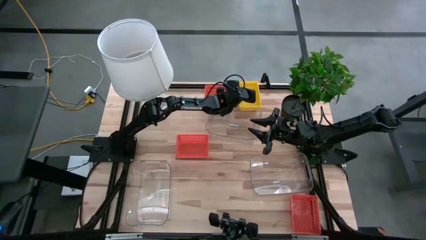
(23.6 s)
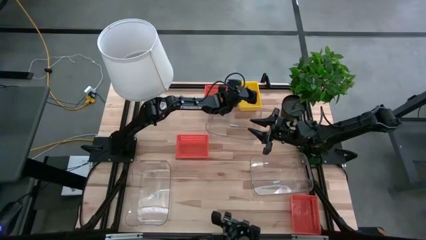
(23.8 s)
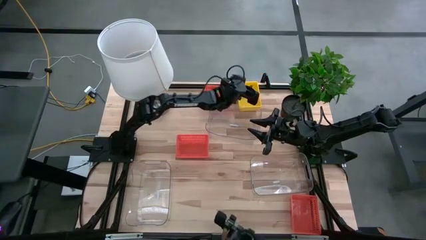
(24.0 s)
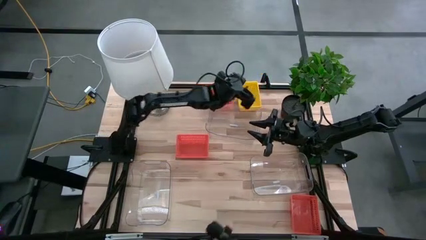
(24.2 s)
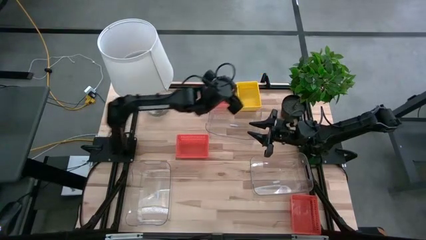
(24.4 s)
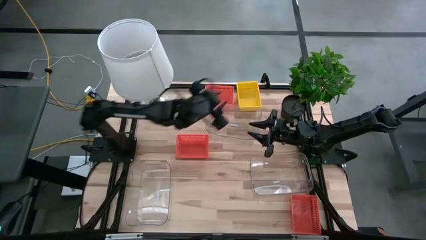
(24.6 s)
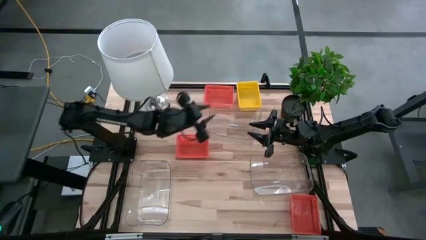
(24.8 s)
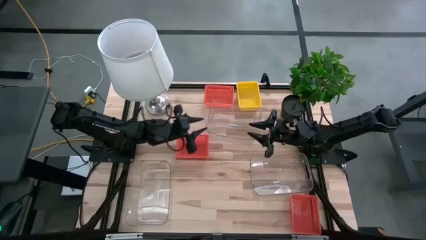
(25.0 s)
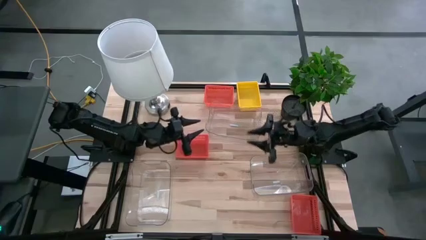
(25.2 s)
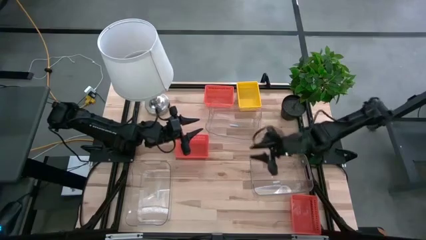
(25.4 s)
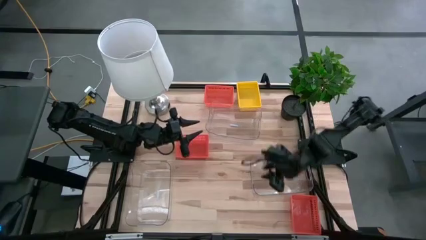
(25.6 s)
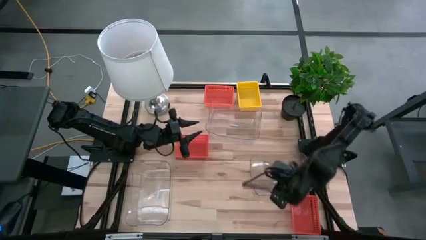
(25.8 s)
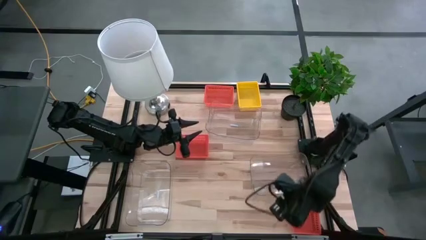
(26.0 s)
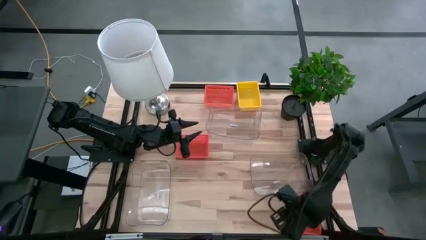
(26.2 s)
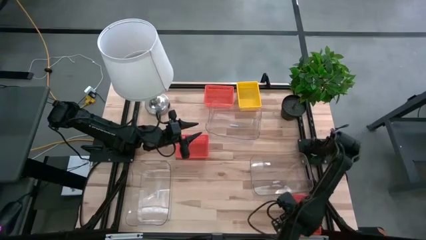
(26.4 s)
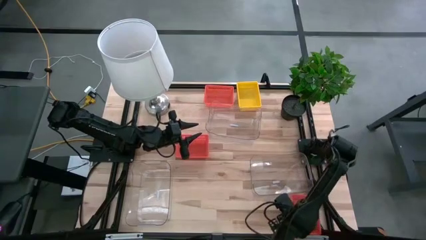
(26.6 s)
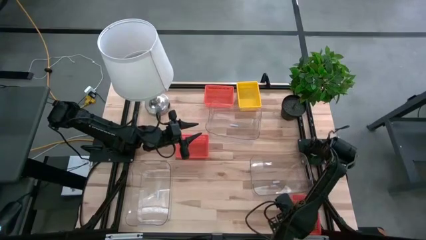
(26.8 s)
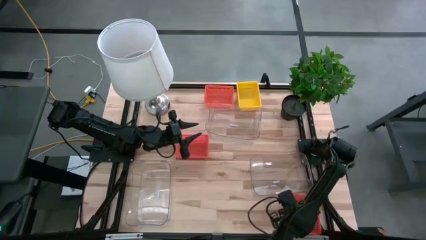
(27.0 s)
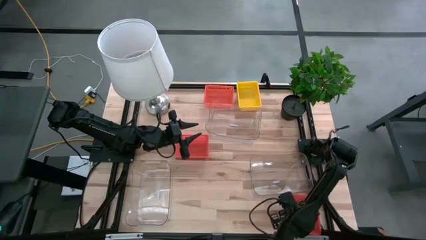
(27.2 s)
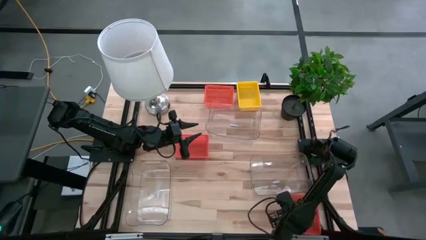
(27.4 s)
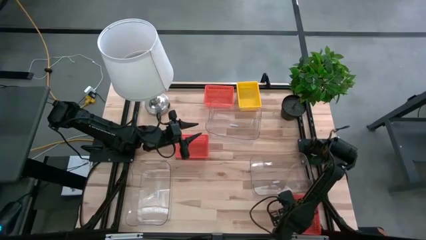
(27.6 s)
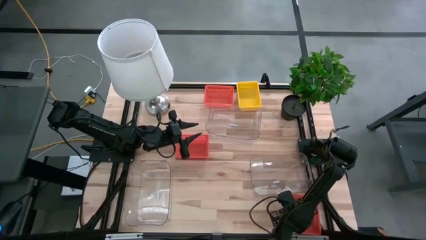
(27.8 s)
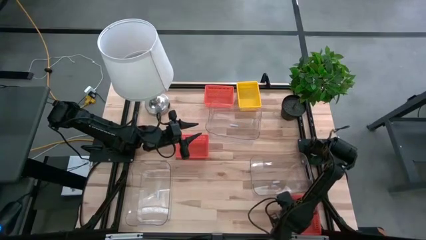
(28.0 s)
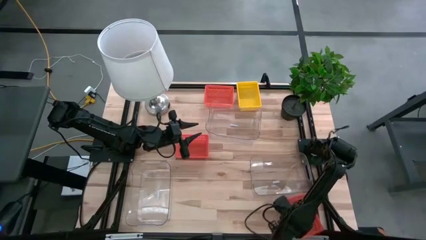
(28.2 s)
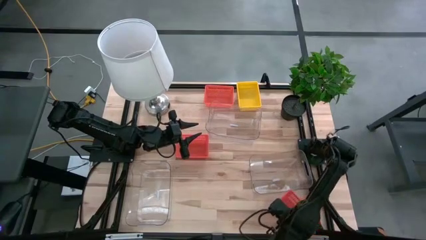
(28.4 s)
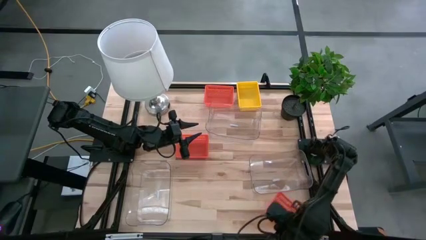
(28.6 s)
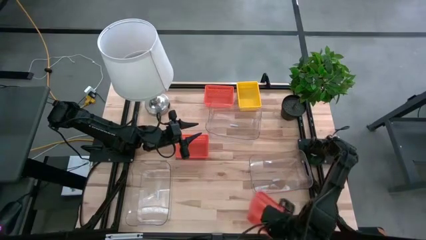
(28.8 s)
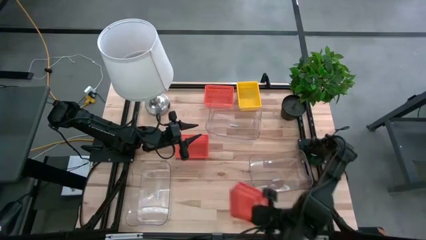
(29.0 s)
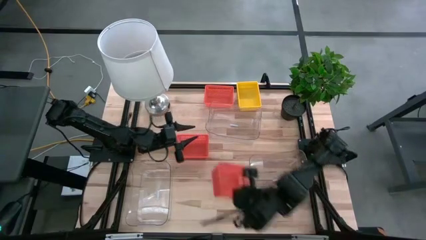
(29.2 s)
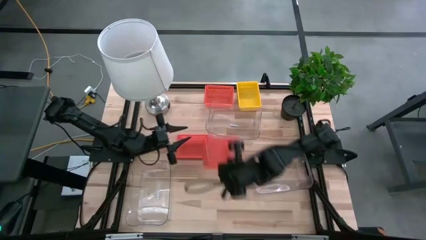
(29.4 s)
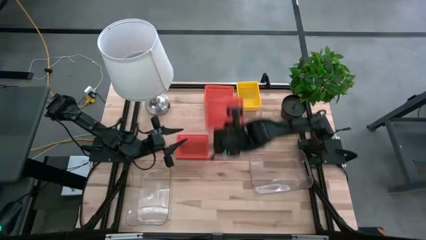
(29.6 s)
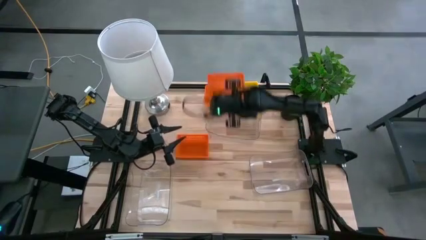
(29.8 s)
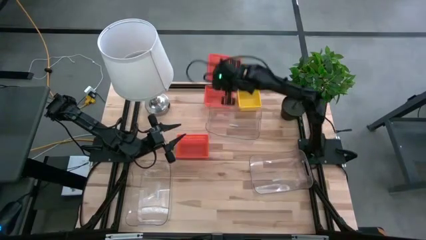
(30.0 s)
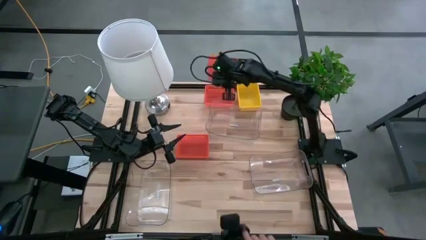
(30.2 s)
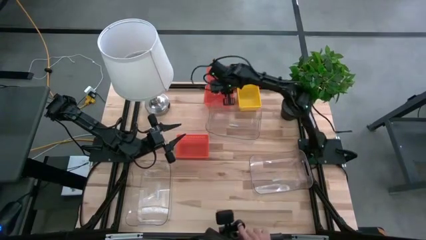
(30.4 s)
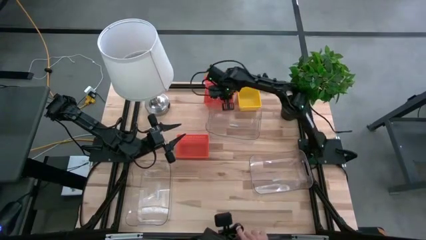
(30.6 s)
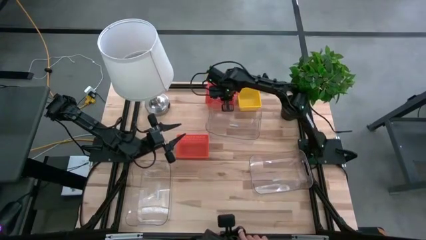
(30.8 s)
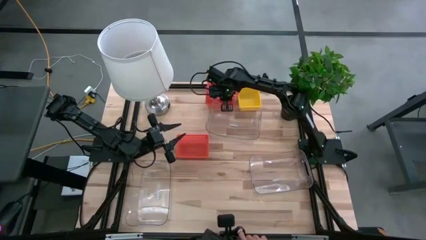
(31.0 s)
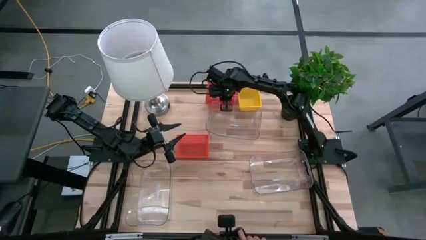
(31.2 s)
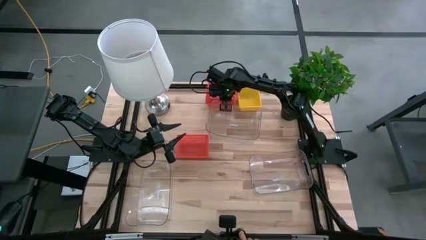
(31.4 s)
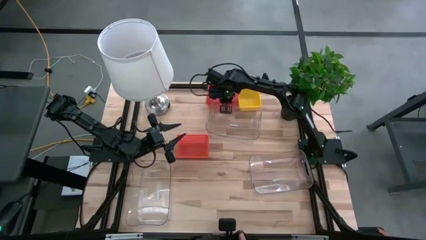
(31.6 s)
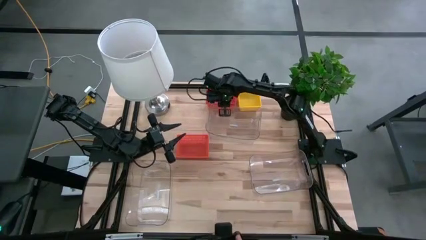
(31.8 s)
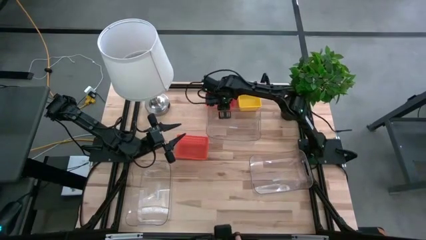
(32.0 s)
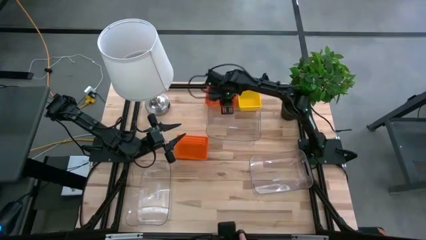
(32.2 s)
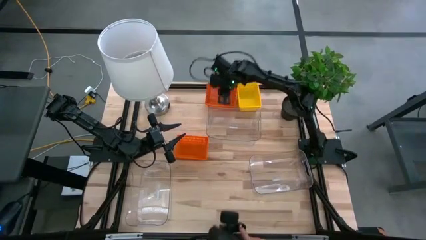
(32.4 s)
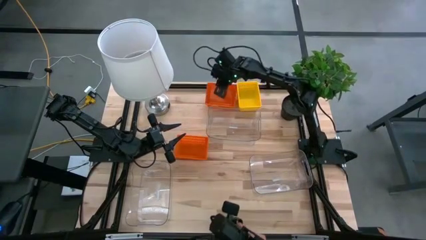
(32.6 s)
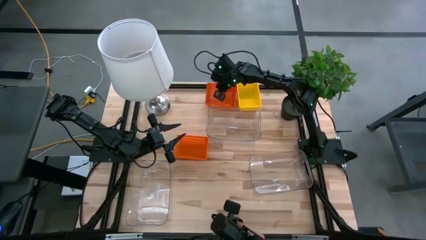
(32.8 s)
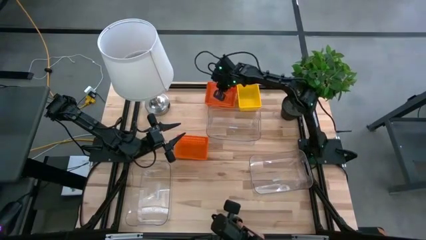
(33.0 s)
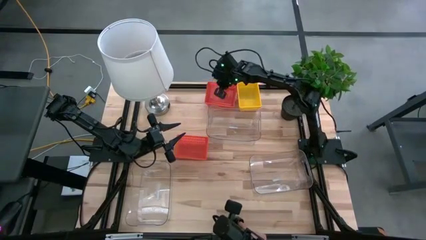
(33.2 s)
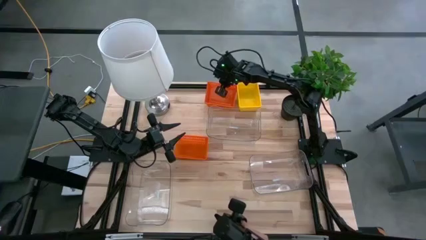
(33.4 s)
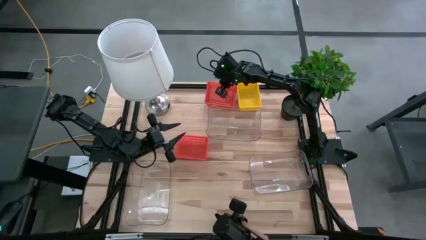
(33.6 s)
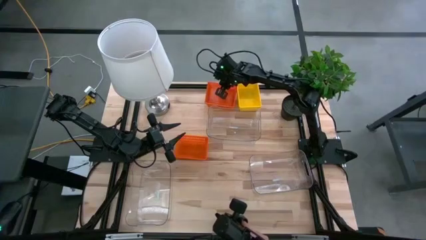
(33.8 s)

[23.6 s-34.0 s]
Stack the bottom orange bin on the top orange bin

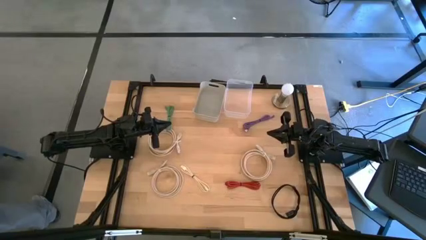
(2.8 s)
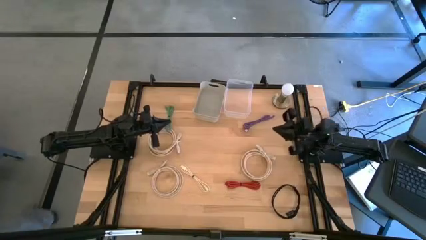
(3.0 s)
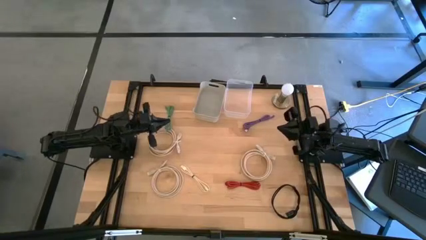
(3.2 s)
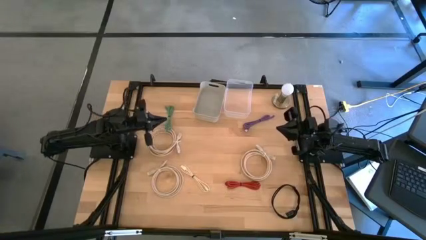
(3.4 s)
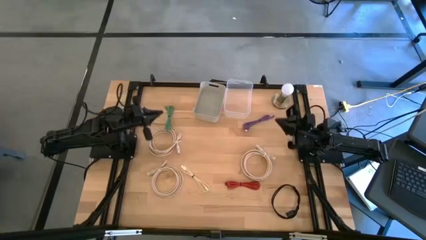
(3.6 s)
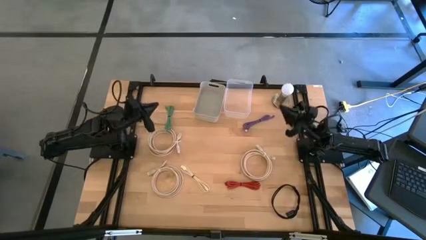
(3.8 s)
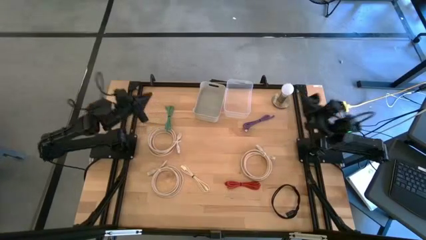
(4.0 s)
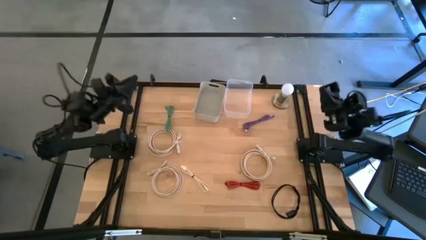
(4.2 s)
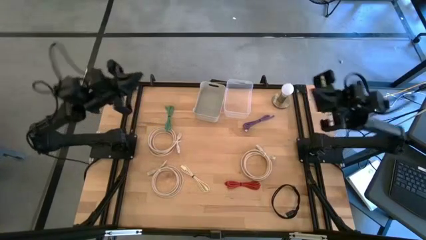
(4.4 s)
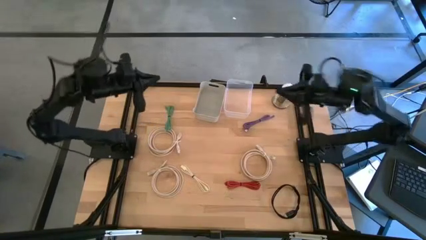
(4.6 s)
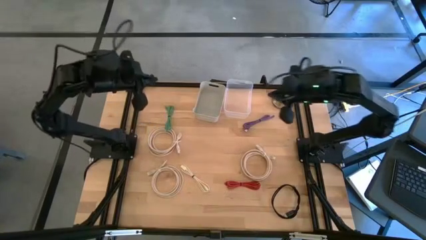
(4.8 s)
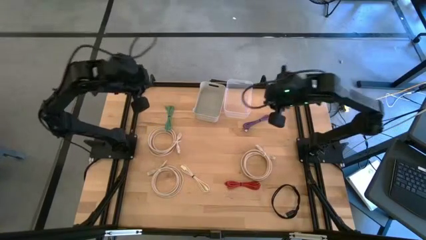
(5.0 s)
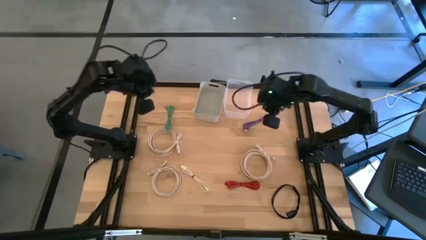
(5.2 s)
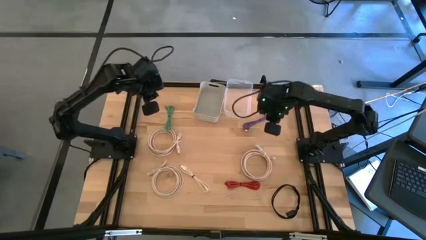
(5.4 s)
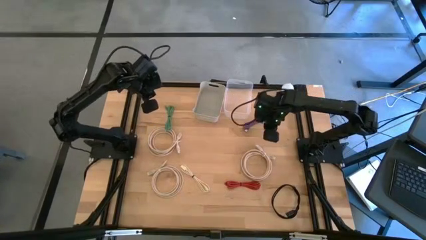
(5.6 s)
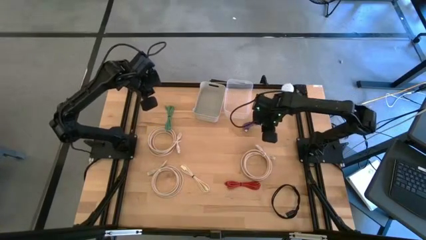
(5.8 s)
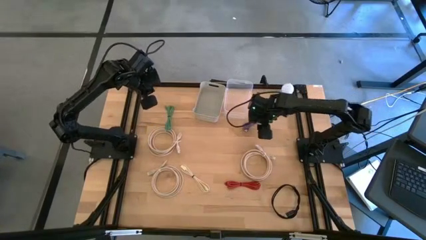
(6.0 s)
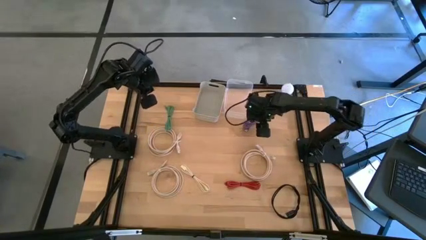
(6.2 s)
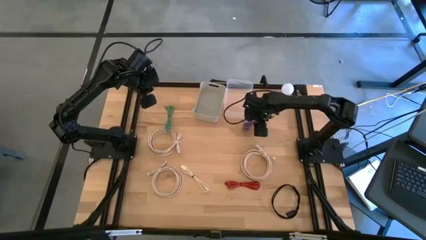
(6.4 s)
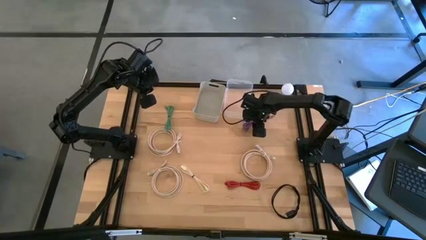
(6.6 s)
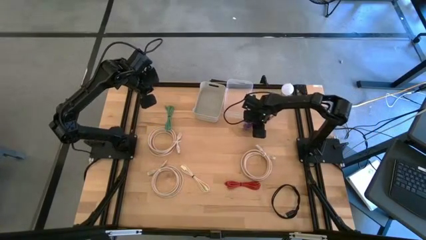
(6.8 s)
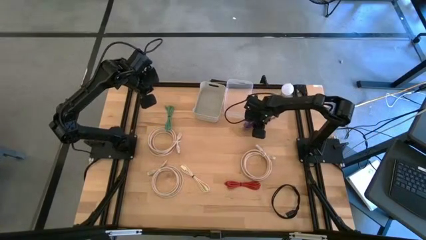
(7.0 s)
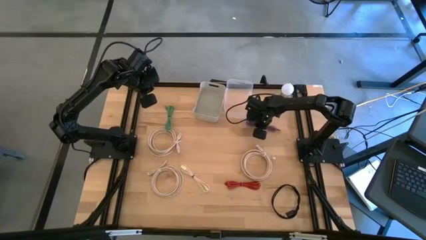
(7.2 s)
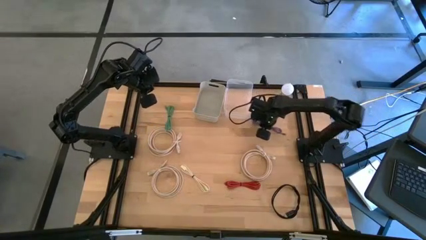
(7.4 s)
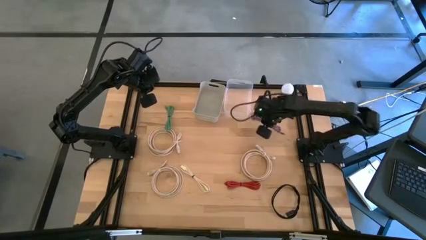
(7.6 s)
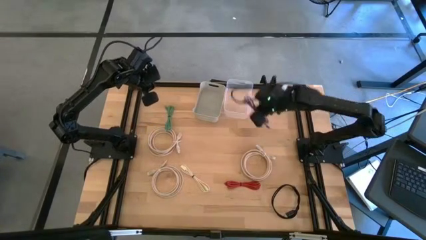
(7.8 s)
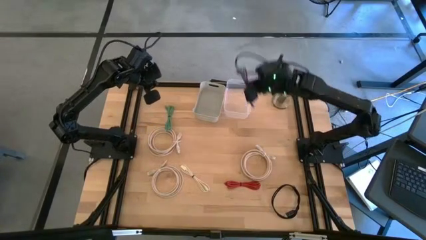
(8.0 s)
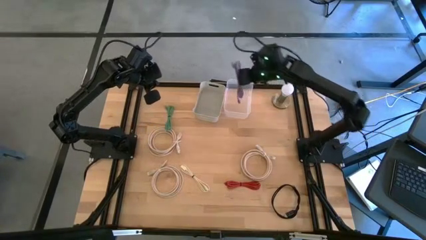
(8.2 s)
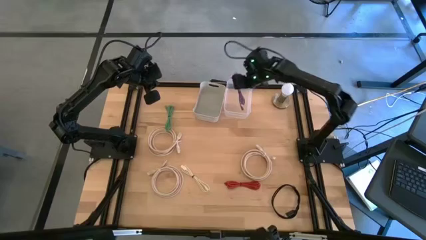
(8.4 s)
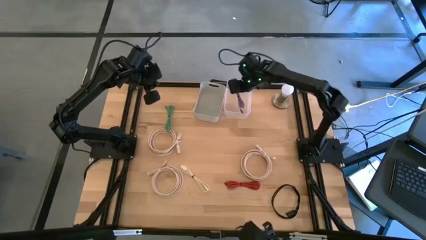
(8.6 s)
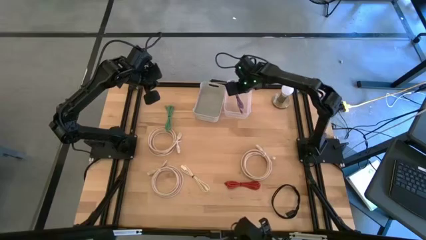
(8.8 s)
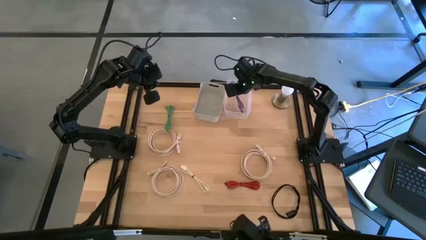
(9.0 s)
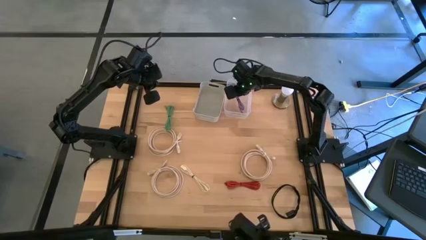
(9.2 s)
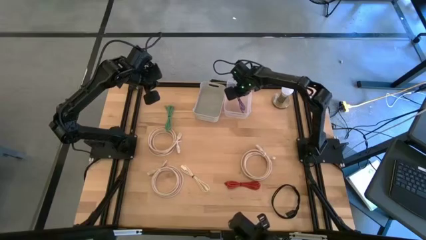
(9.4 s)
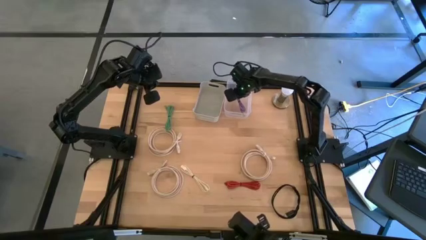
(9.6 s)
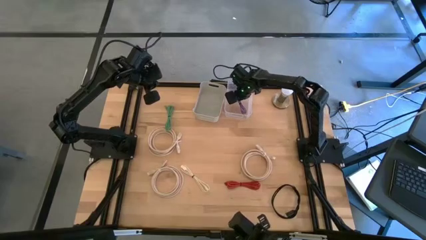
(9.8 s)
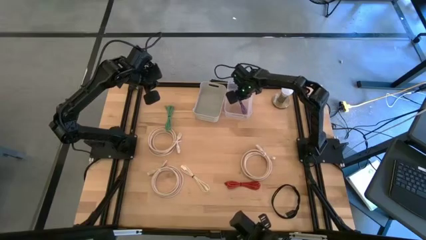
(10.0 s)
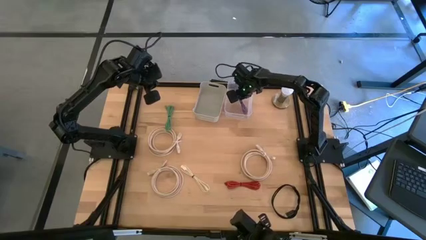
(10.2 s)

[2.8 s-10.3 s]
Put the purple usb cable into the transparent bin
